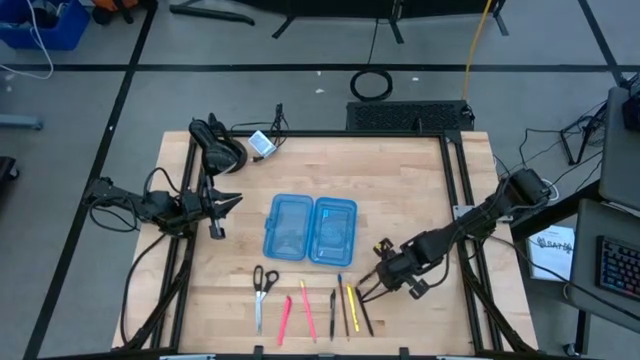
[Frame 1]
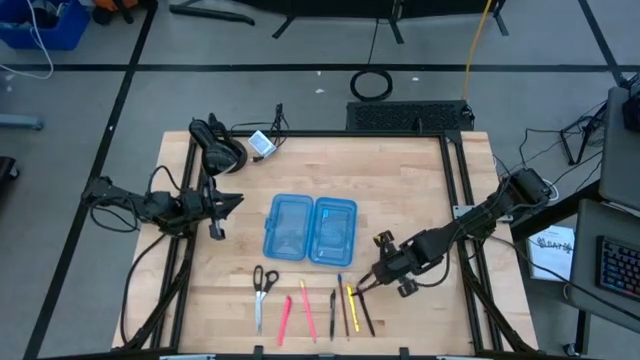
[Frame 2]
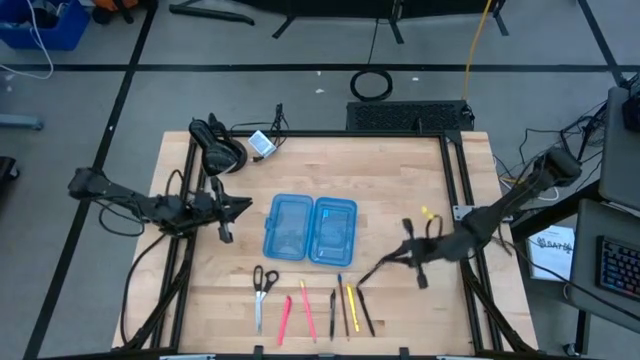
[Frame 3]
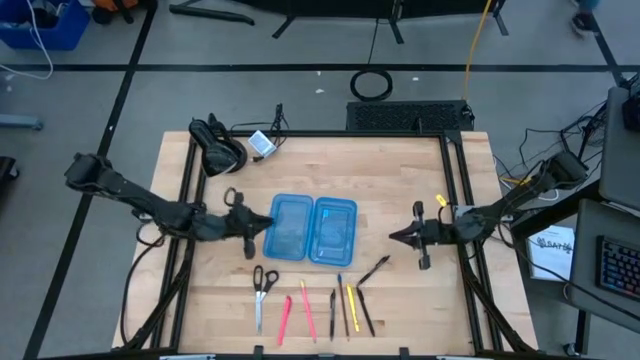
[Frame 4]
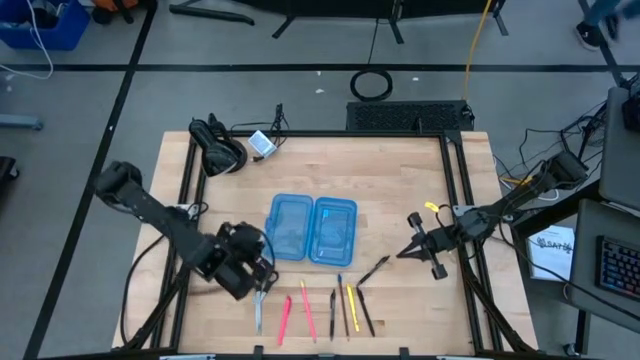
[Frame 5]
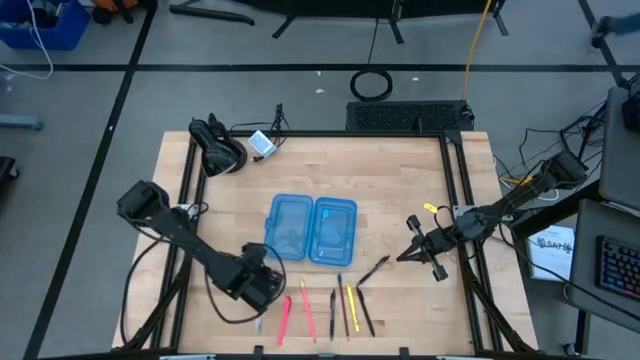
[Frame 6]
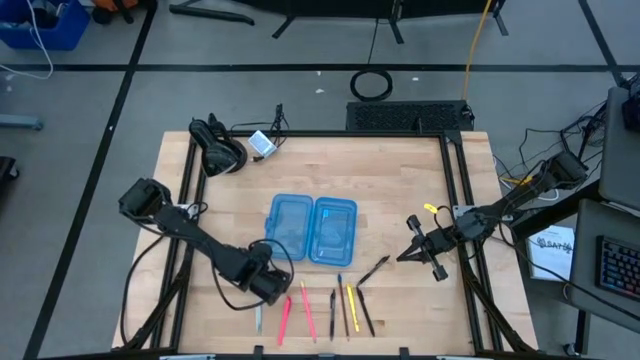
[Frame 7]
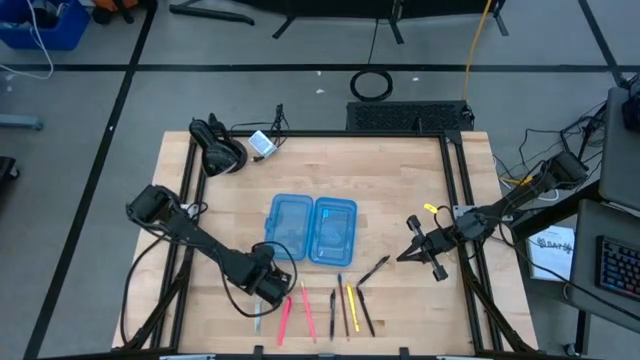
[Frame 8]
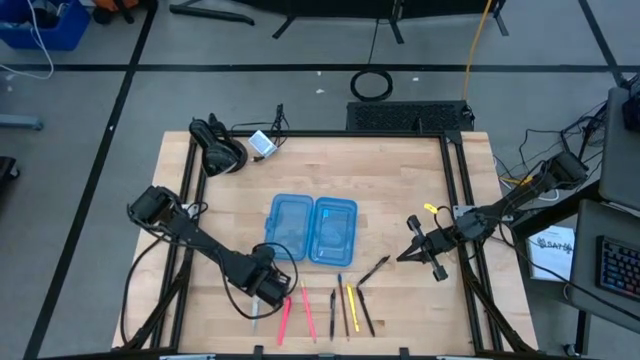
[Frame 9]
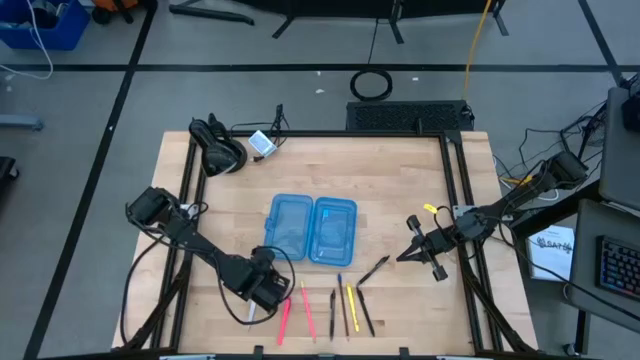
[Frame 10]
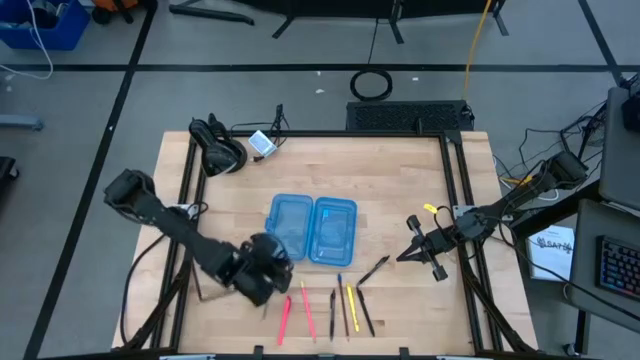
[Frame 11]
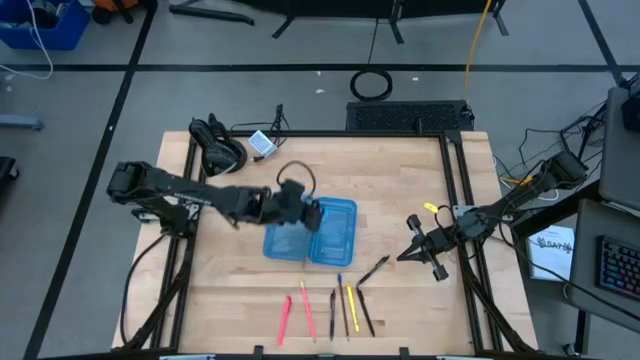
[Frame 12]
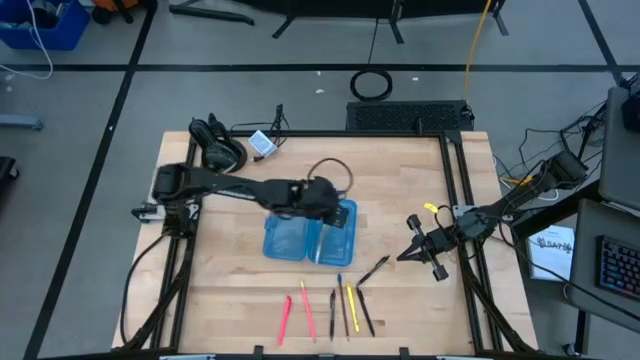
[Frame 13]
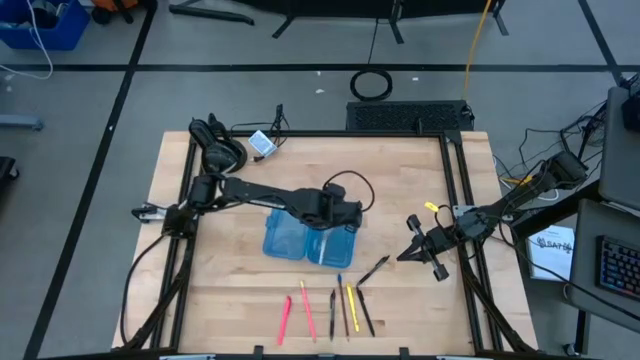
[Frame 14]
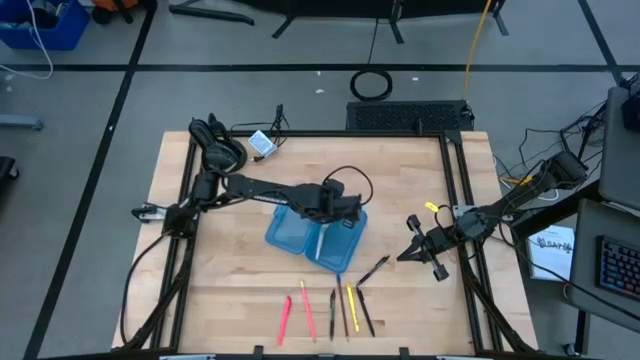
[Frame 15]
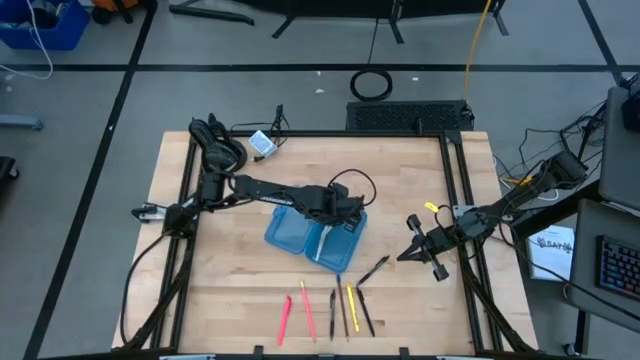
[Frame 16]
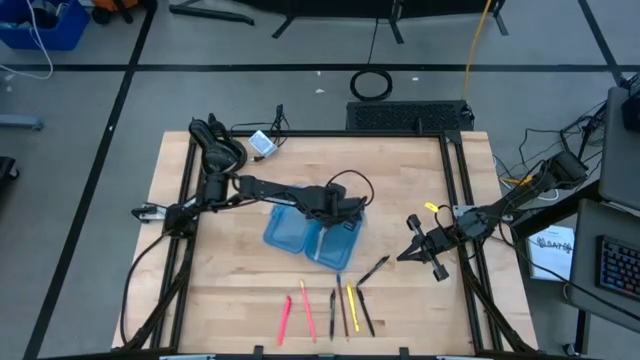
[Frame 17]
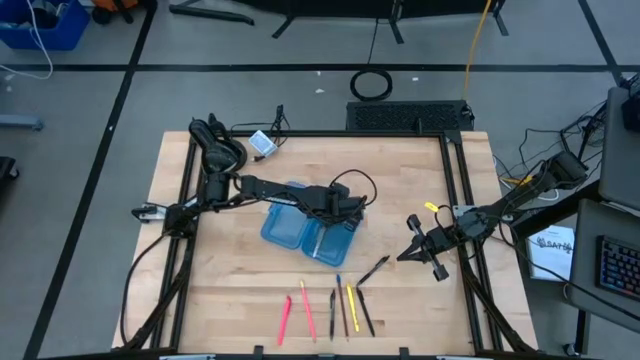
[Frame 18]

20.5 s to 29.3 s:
Task: Pick & place school supplies into a supply box
Put the black scissors into the blue supply box

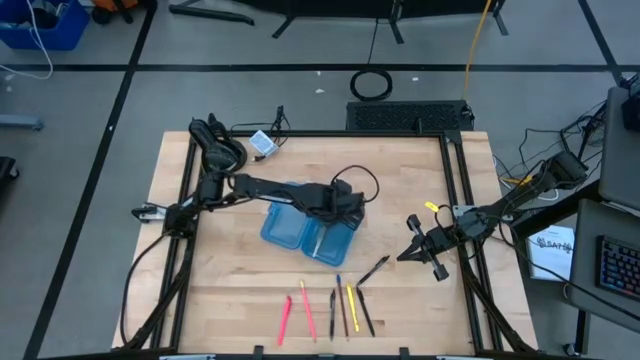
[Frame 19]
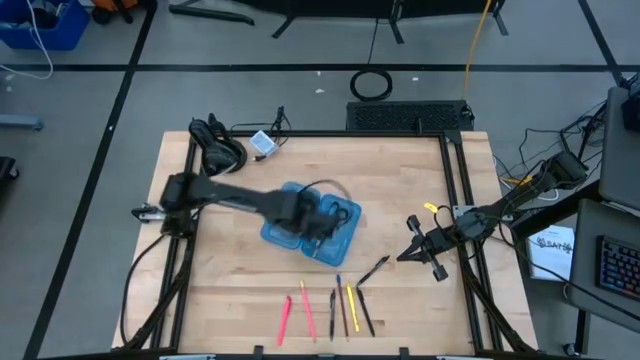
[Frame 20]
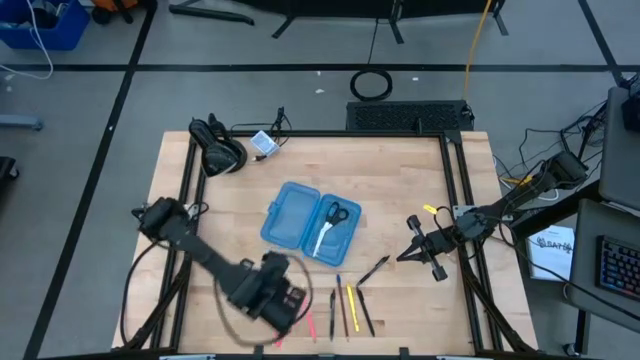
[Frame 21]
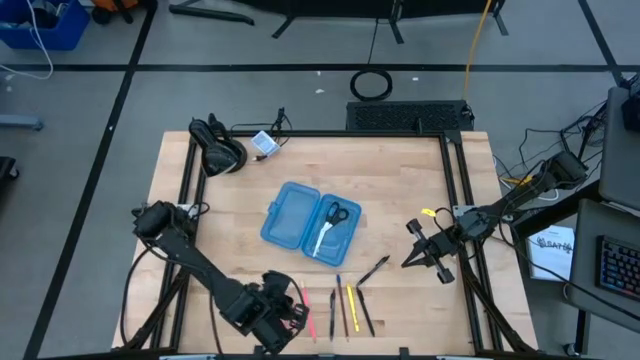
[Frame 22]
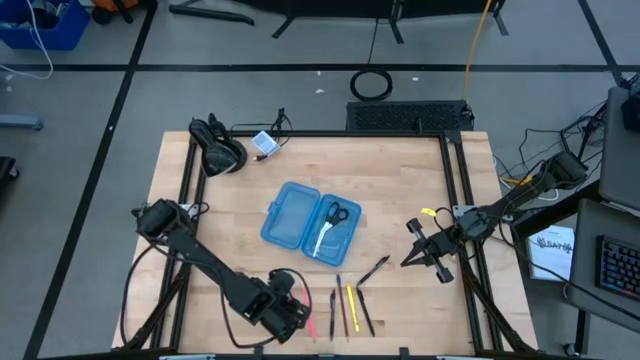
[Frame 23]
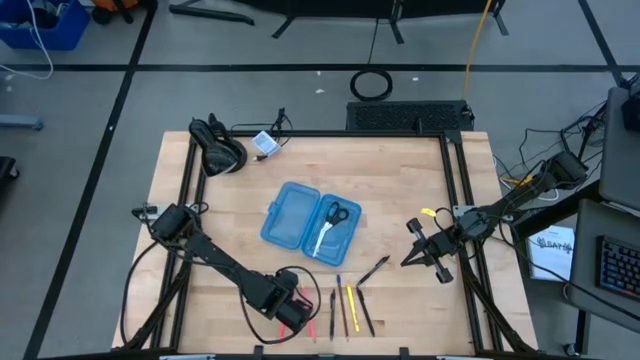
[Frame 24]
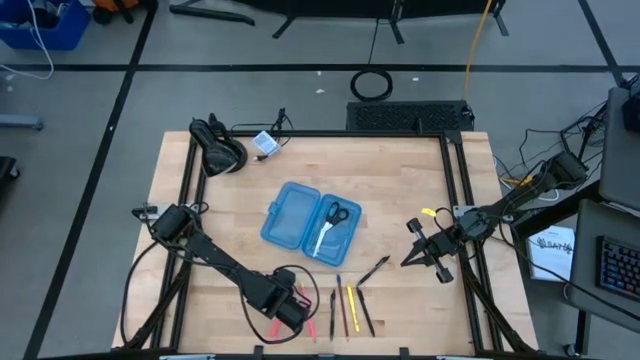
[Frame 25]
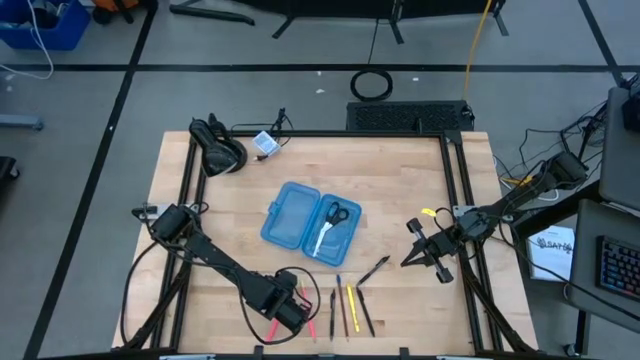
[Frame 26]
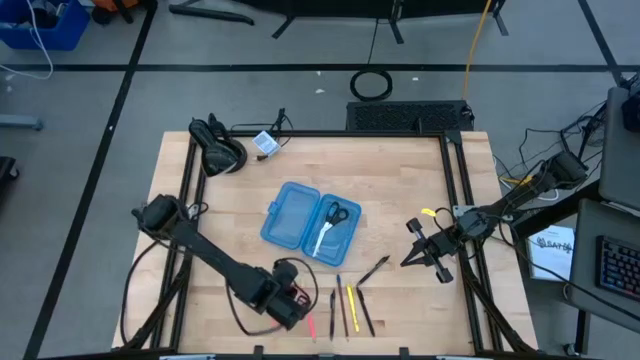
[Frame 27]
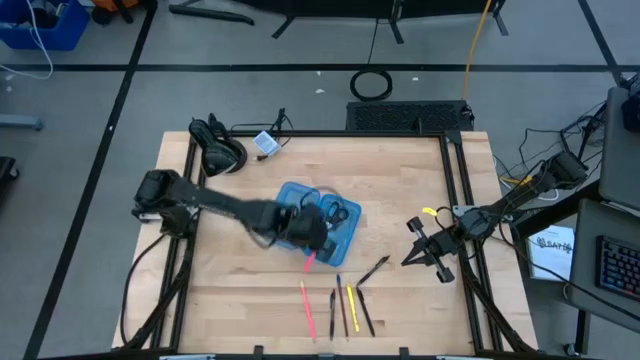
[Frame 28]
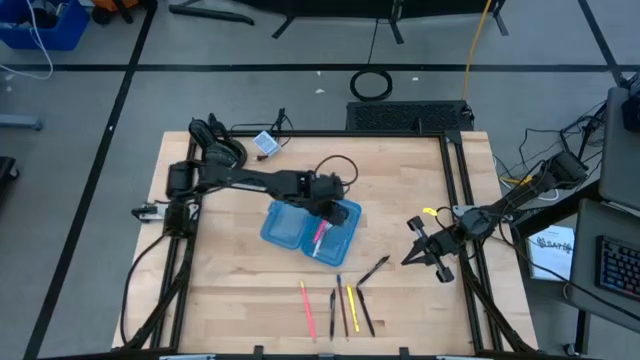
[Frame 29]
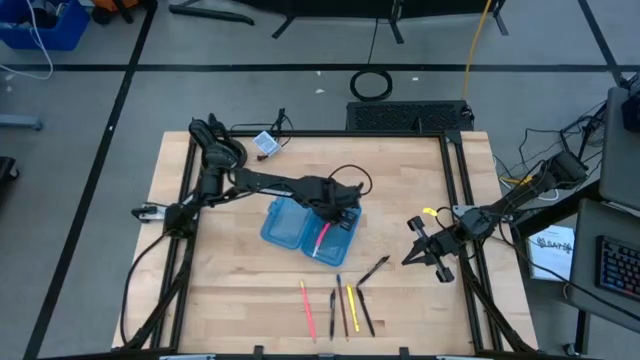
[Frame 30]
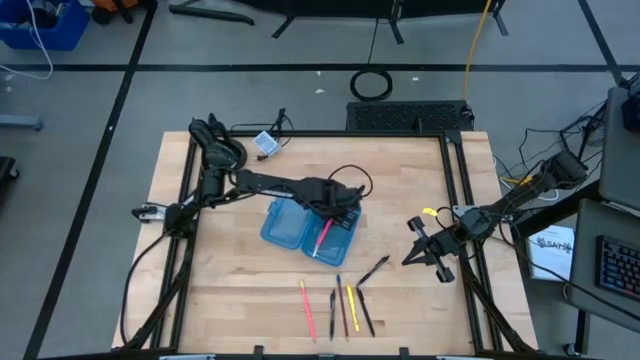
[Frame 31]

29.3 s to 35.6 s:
Put the pink pen into the blue supply box

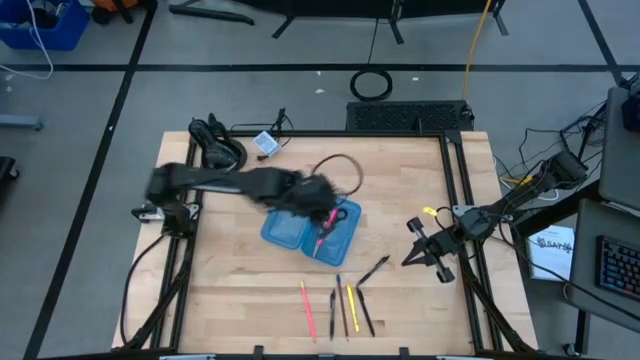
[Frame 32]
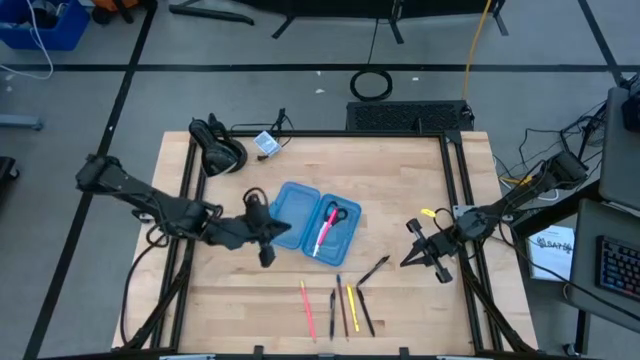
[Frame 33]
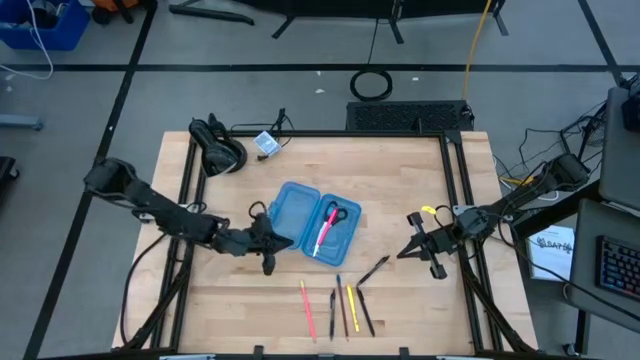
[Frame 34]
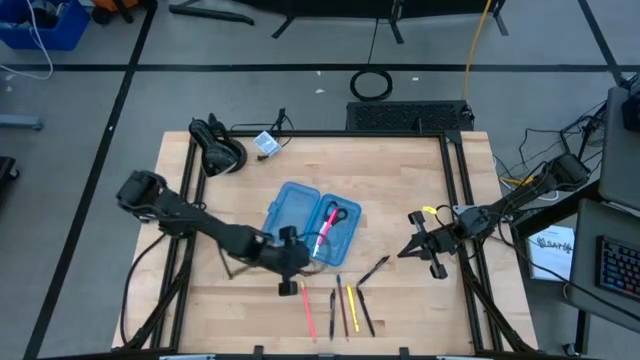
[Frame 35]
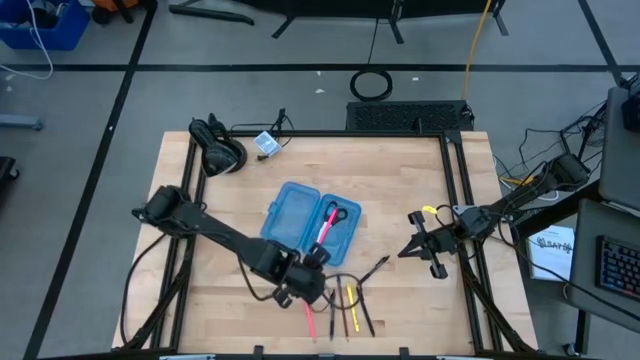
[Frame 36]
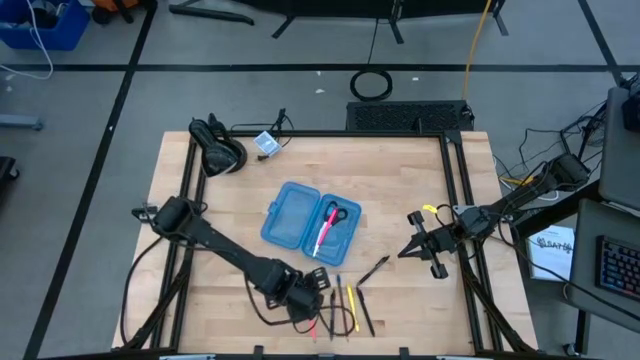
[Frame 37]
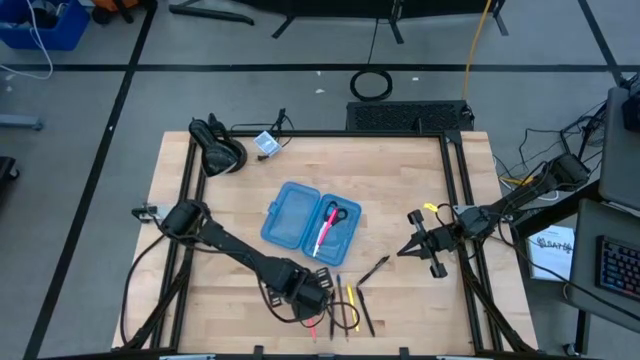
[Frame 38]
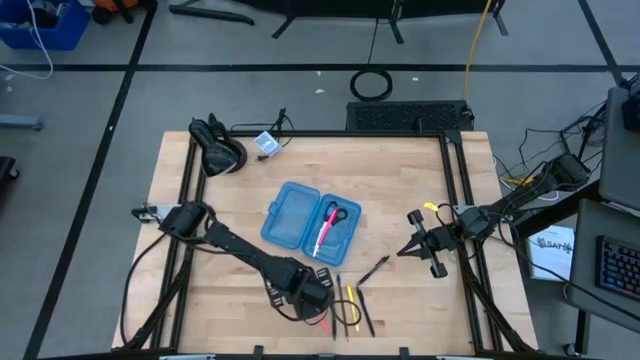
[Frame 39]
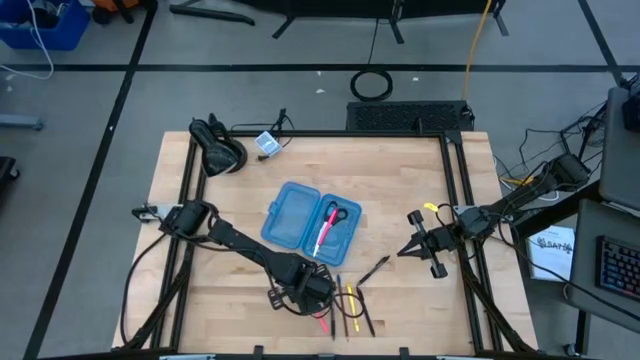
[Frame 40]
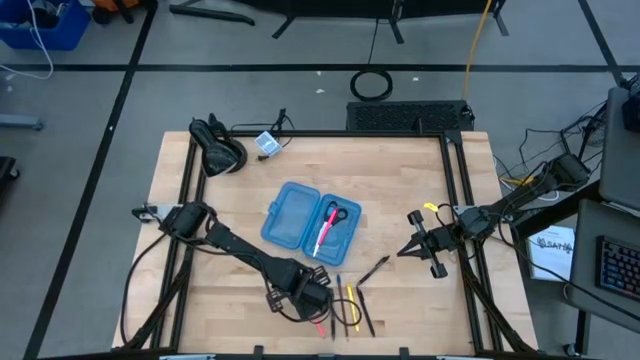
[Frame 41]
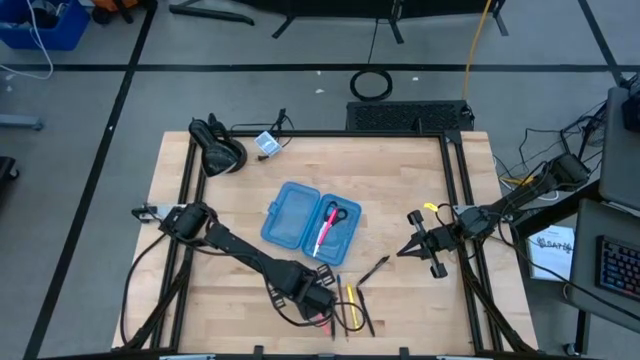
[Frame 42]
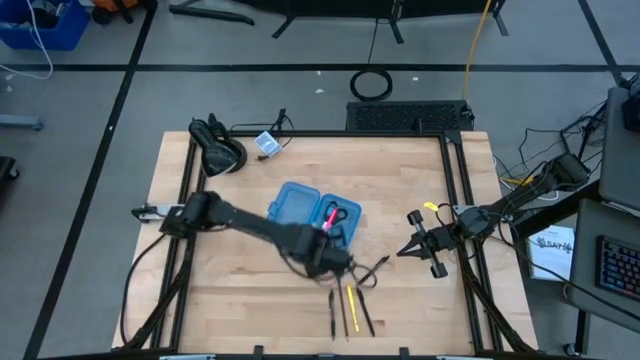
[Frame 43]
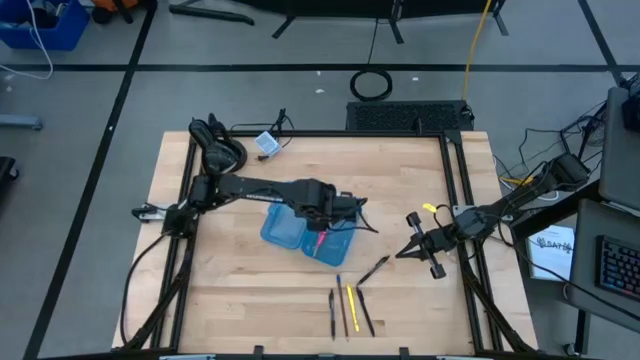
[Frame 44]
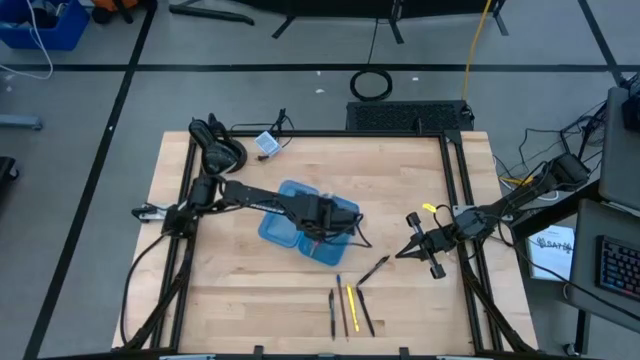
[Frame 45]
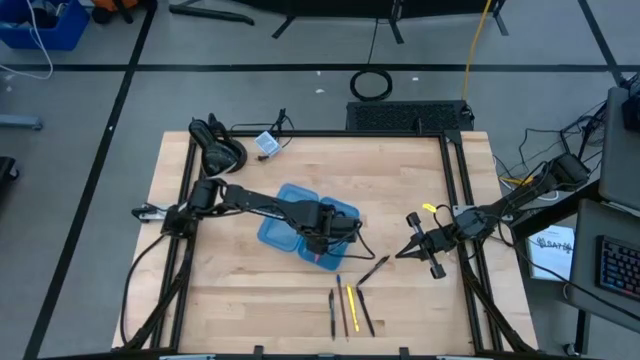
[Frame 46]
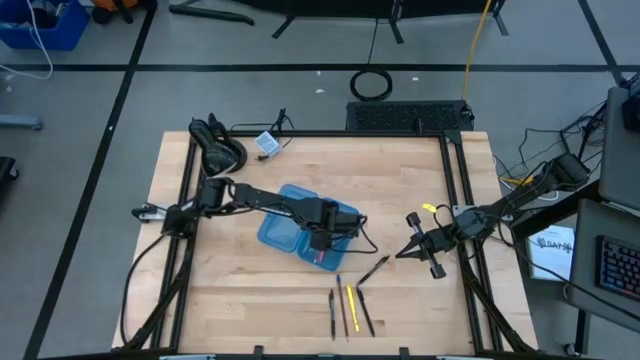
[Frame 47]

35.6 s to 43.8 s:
Put the pink pencil into the blue supply box
